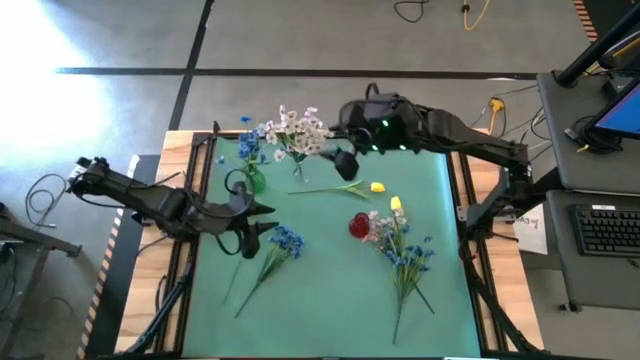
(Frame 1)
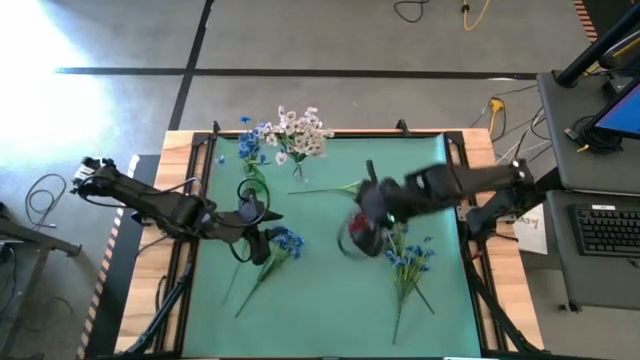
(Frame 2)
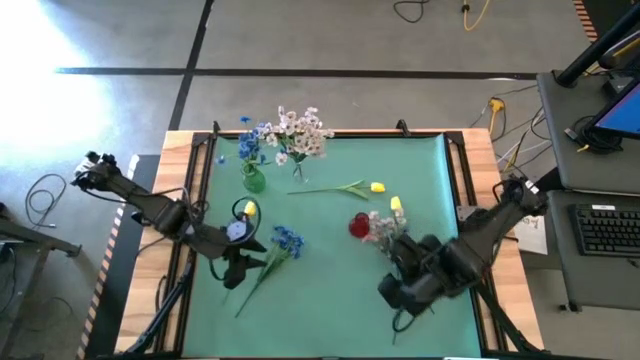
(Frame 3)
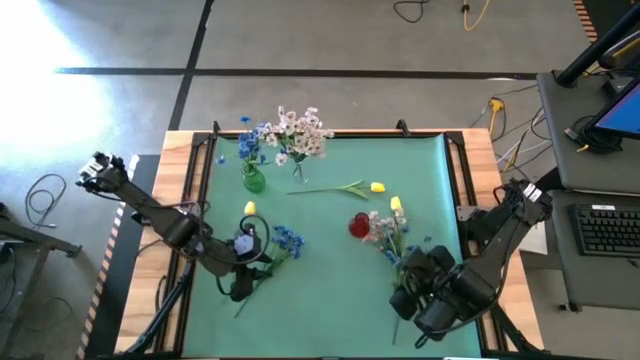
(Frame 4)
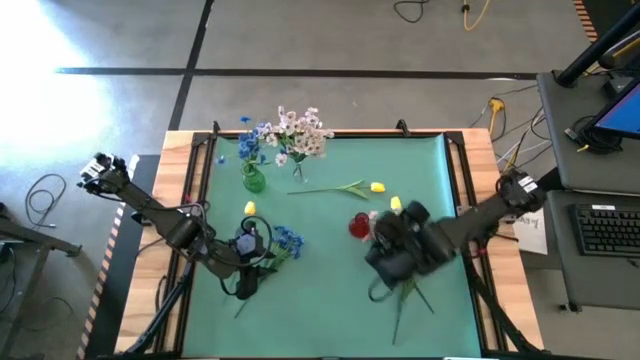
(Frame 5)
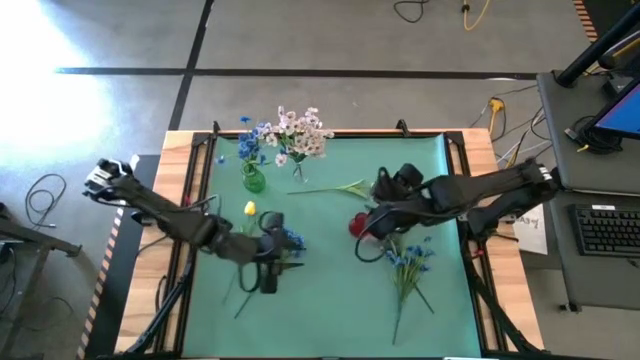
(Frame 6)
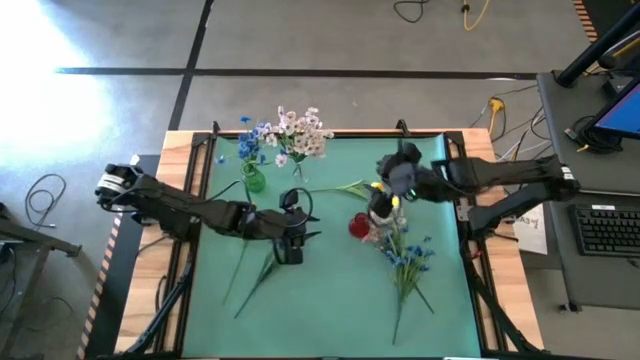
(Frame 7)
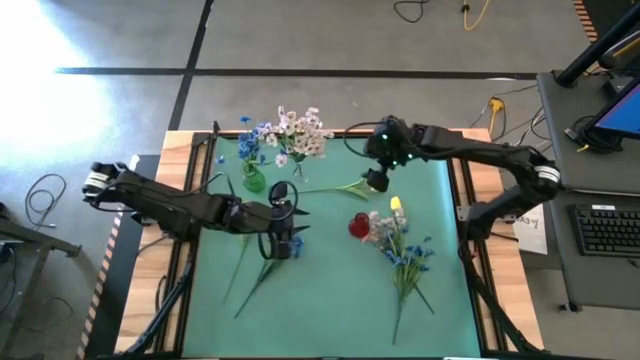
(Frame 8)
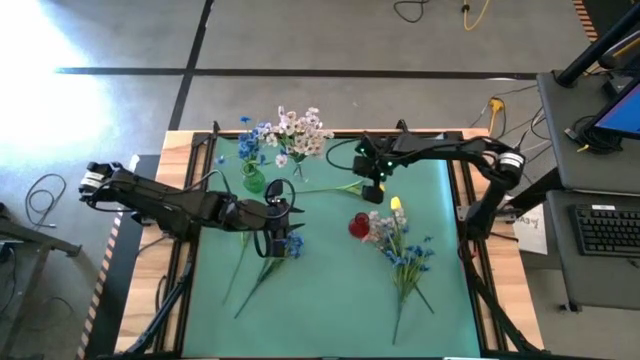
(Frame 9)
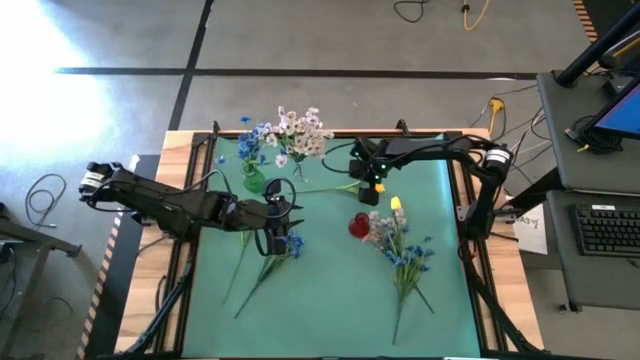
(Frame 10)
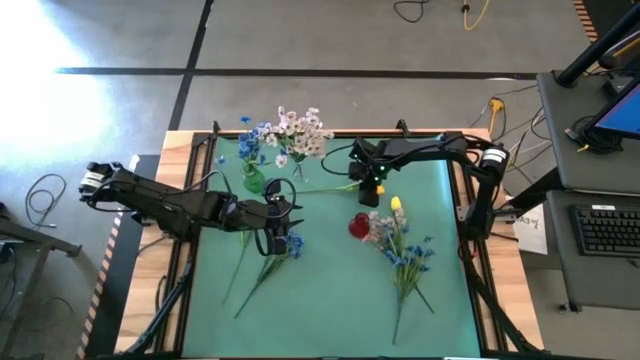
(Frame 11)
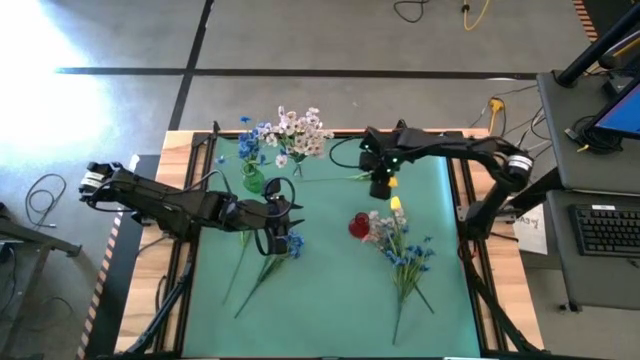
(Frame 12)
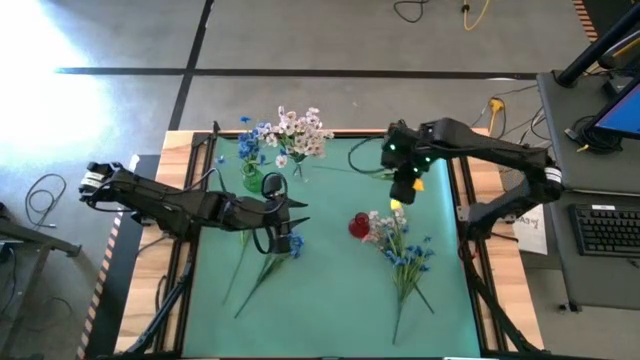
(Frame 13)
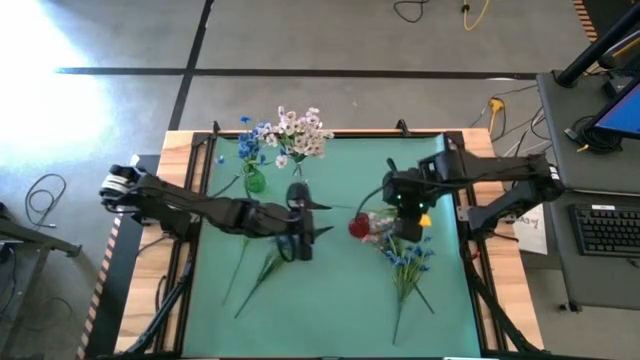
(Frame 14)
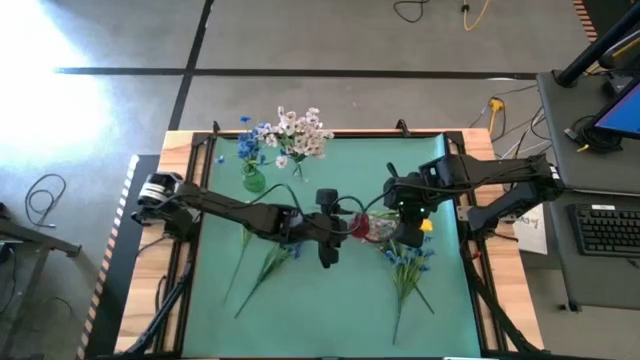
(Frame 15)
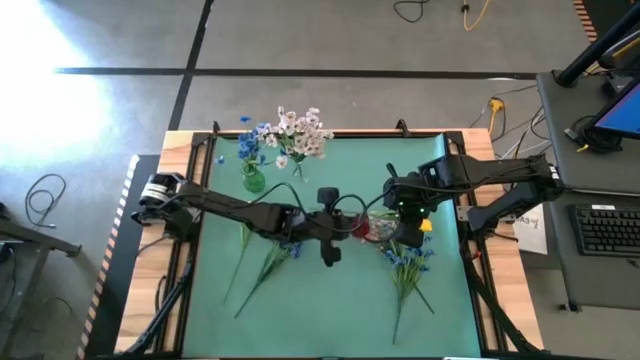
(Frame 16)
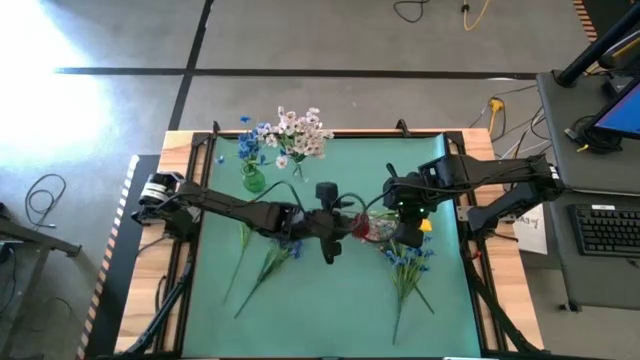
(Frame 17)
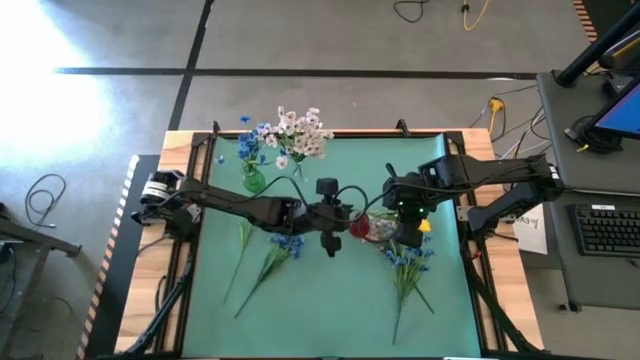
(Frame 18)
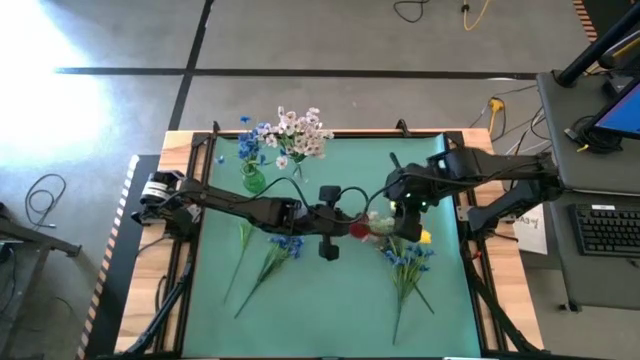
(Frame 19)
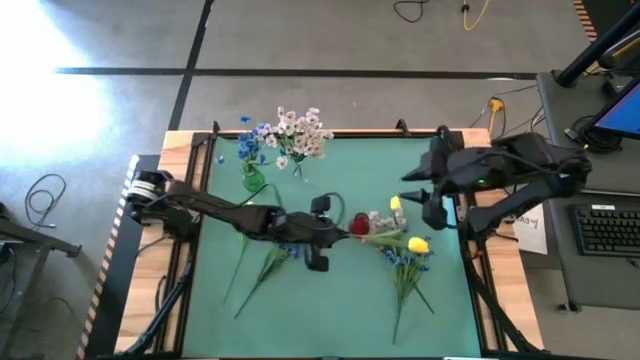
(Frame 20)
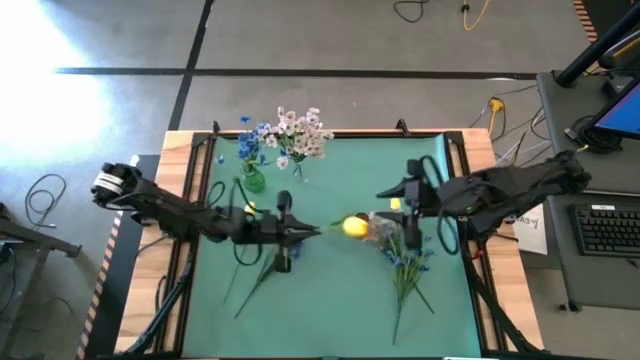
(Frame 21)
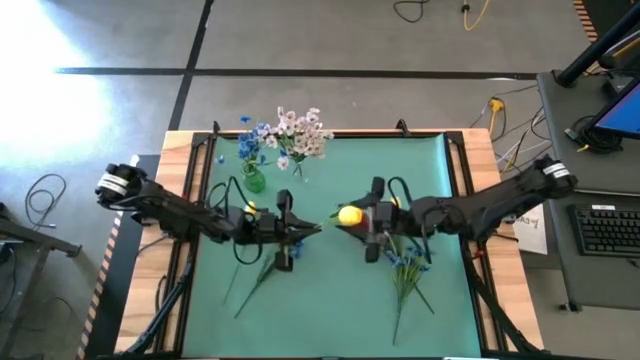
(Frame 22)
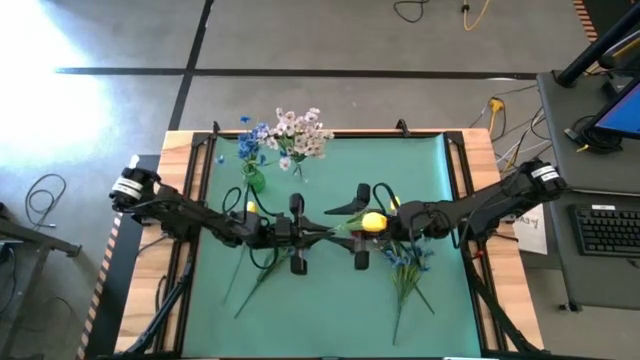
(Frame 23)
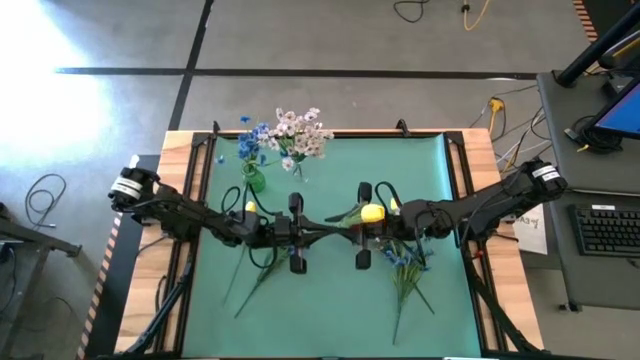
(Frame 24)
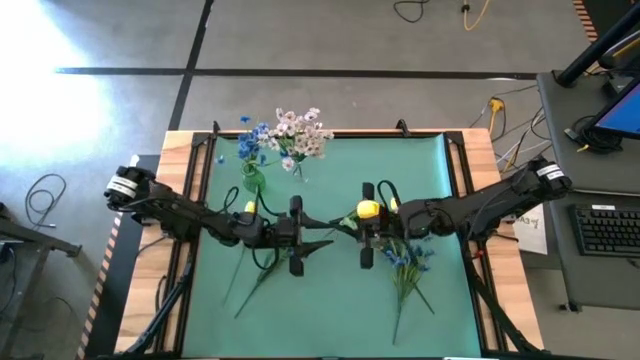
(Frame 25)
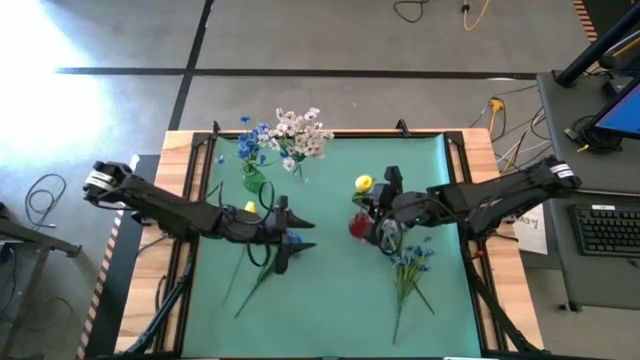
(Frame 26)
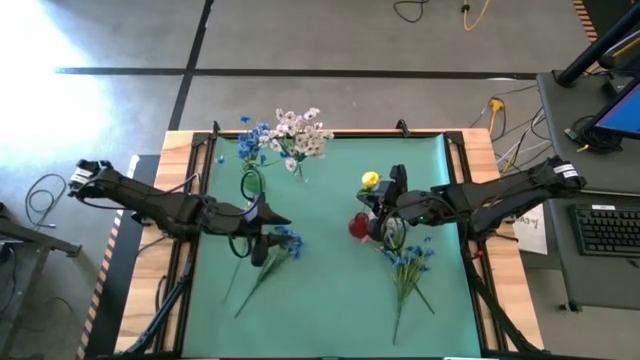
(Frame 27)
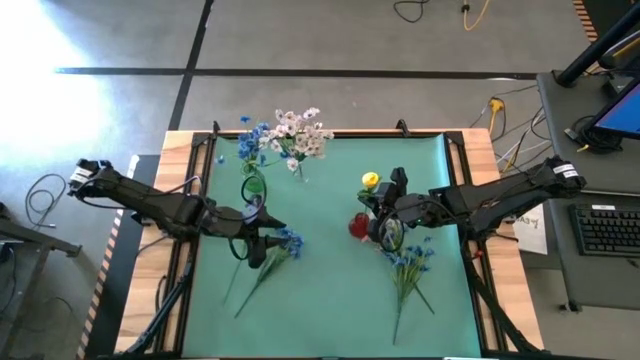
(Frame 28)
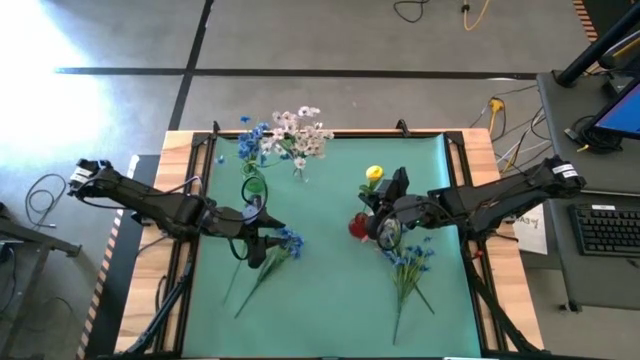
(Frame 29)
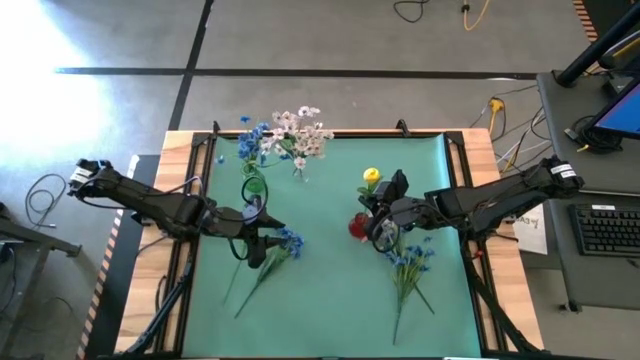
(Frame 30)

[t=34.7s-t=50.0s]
Task: Sort flowers into vase by color
Put the top yellow flower into the red vase

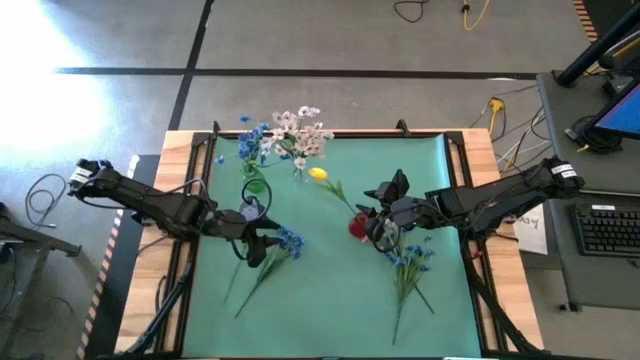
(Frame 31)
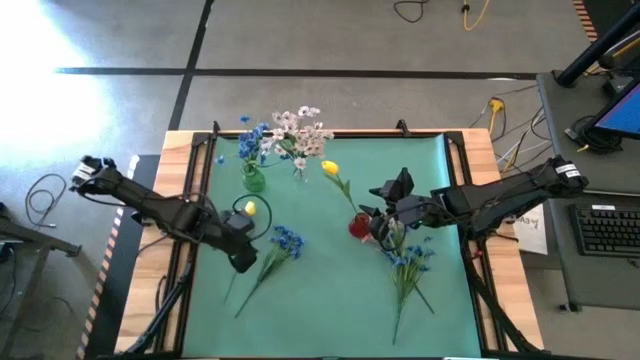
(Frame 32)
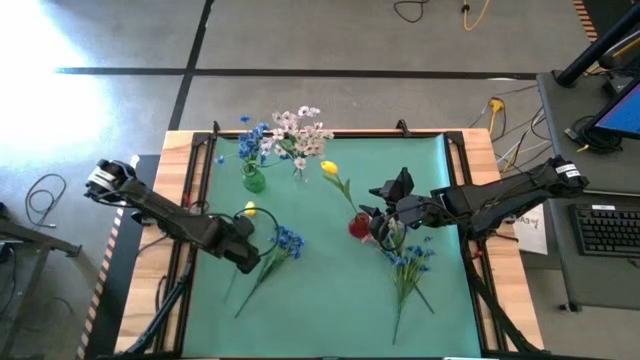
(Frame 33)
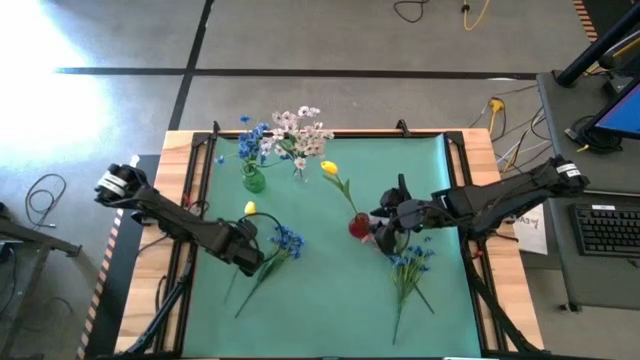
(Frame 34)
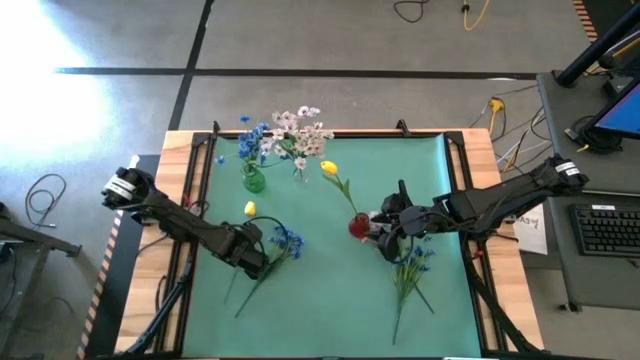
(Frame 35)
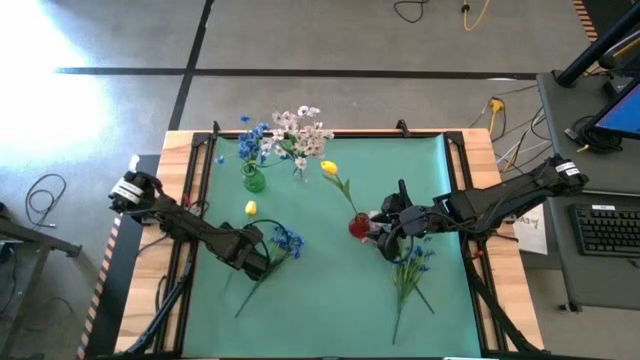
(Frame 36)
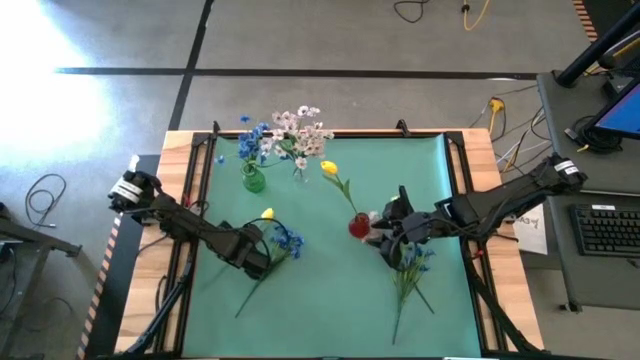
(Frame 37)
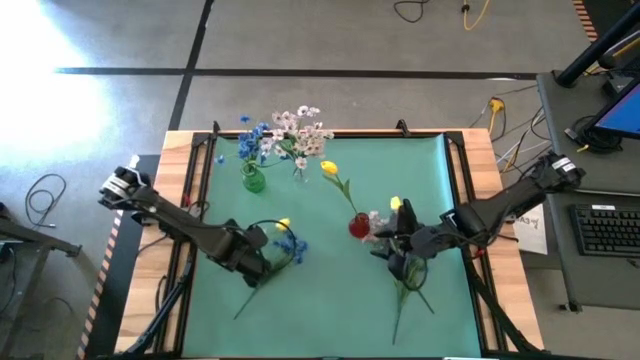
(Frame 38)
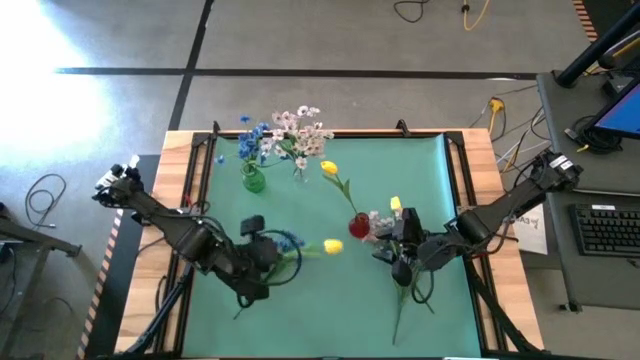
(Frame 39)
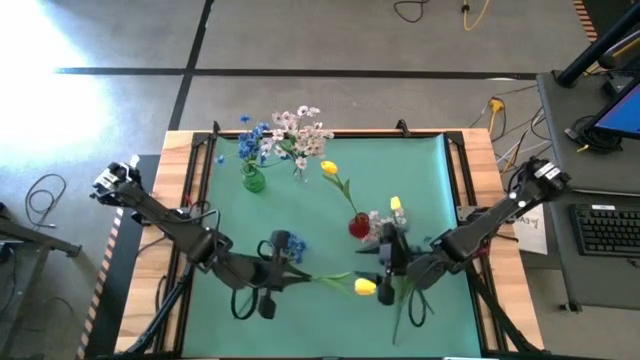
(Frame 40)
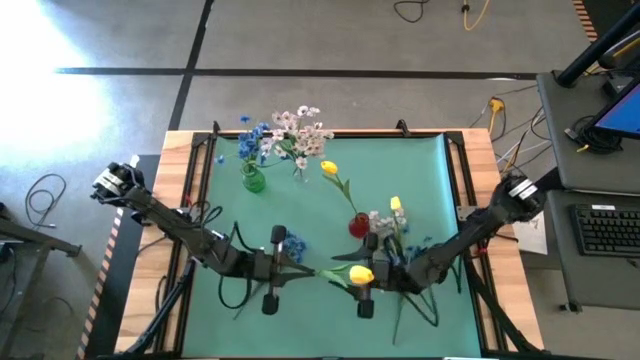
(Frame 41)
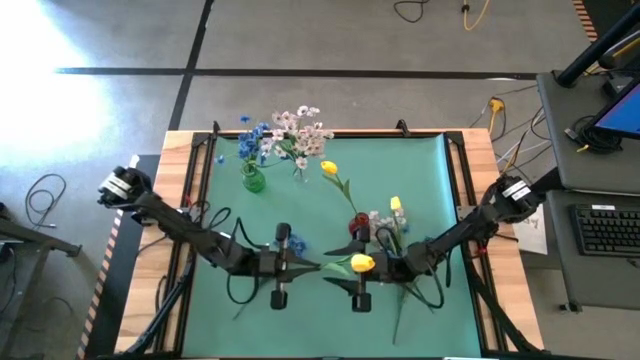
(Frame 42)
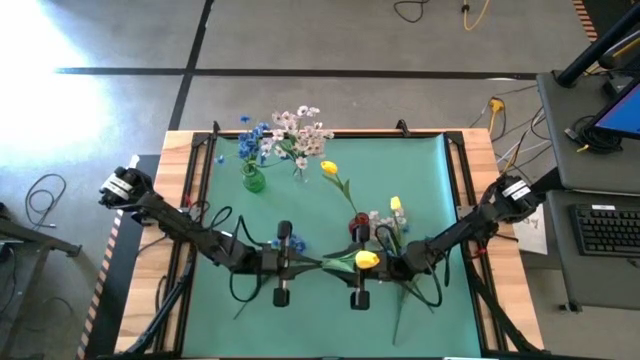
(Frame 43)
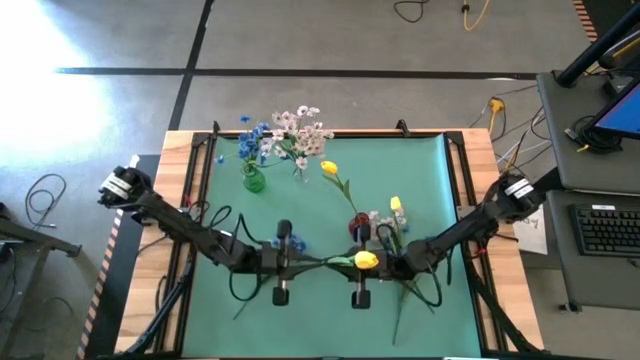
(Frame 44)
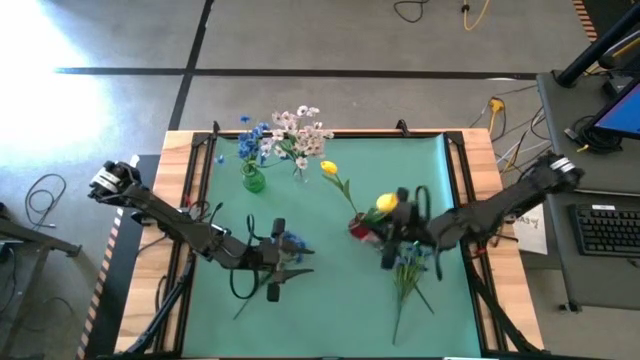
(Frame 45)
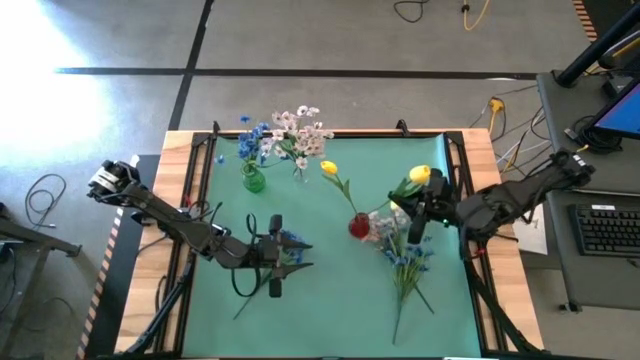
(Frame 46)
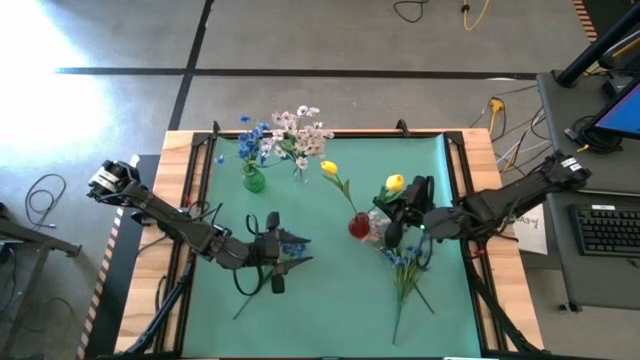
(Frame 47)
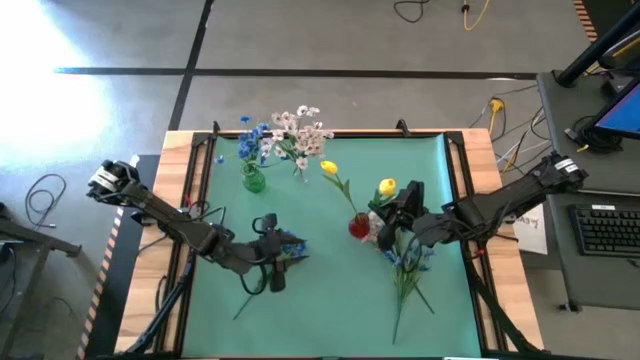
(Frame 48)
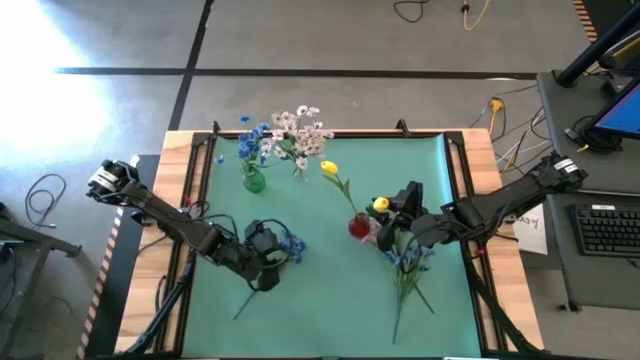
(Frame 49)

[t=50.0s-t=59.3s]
Put the left yellow flower into the red vase
